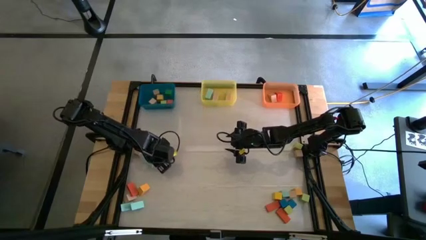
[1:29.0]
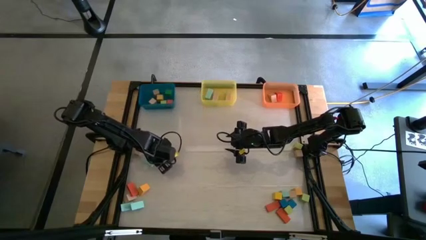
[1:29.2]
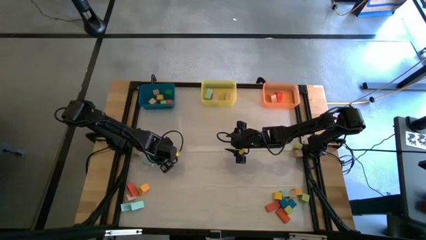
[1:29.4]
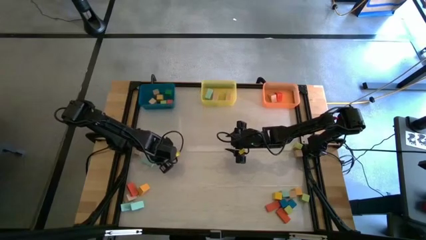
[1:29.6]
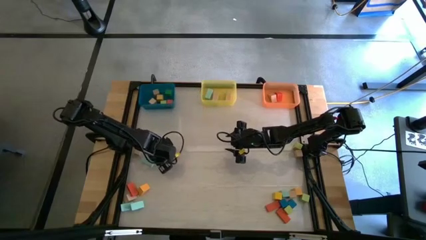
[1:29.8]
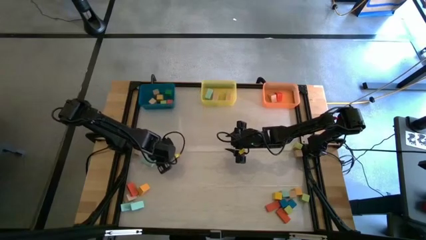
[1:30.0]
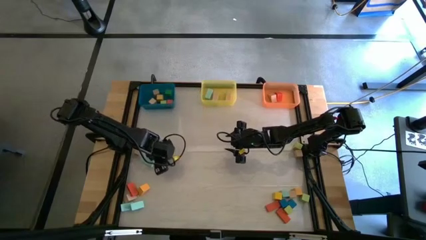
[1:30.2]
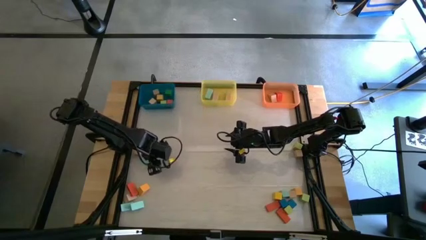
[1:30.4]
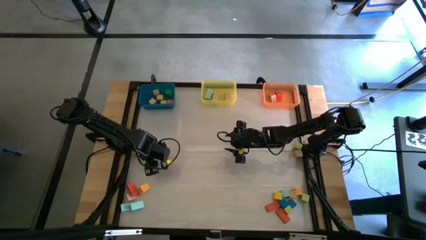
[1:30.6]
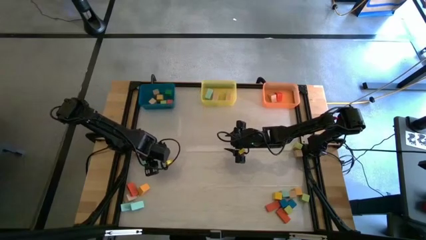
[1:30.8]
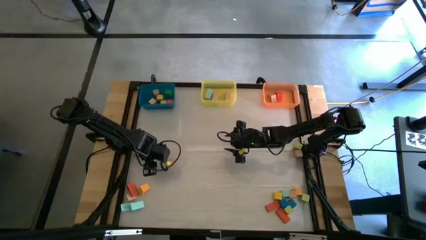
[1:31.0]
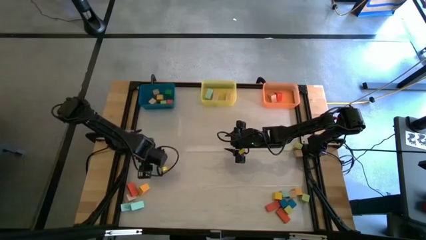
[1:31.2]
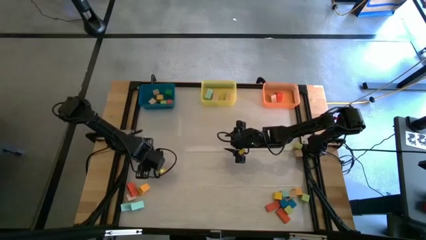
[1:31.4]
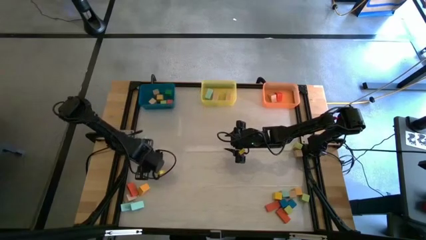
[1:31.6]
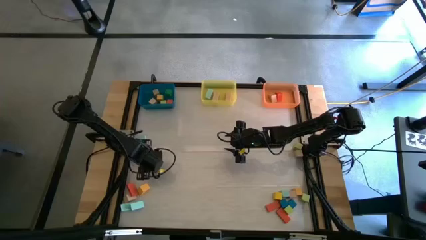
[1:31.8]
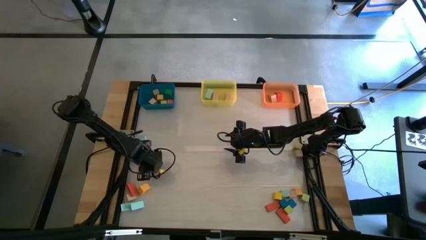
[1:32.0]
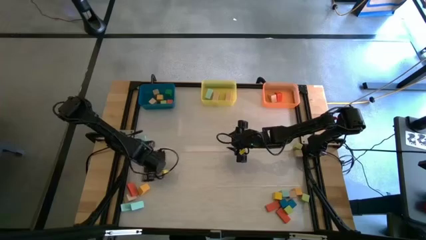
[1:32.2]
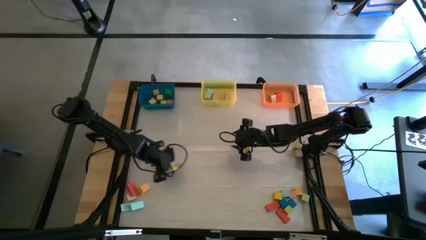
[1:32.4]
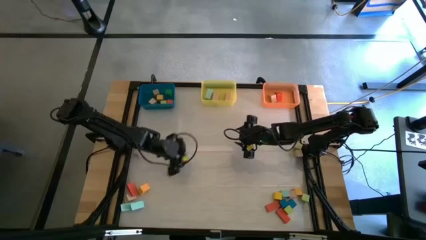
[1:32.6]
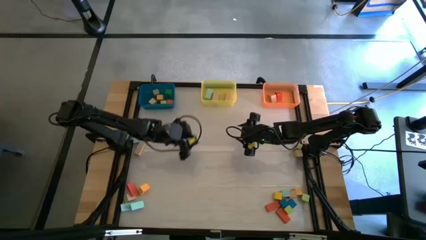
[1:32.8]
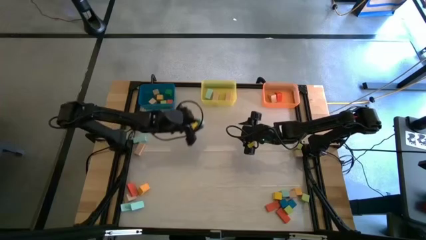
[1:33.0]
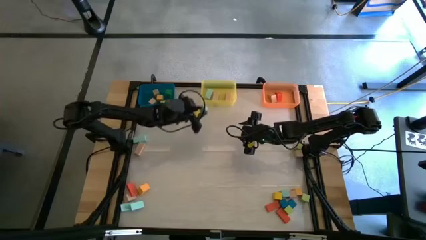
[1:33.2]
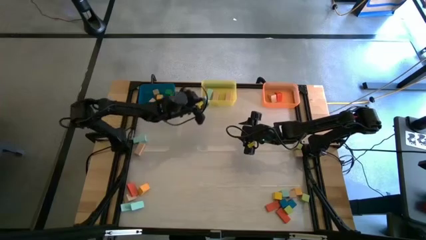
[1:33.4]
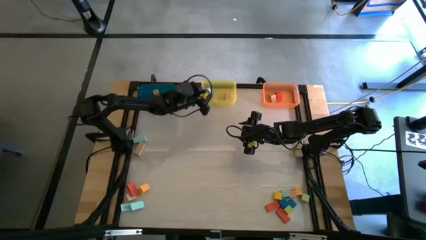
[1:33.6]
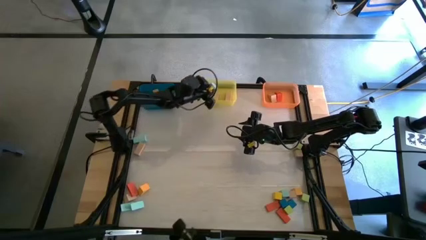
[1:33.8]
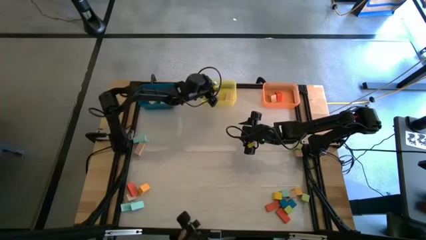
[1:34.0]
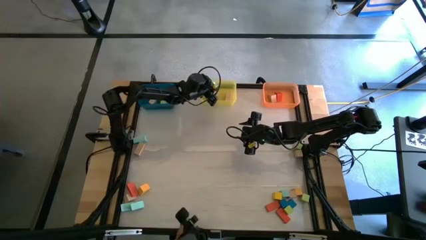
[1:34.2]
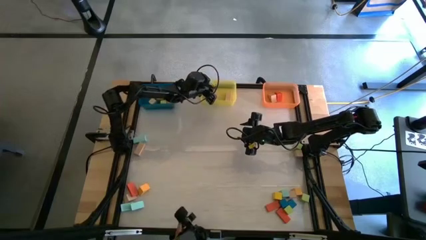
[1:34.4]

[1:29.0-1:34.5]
Task: Sort blocks by size
Put the light blue rectangle block into the yellow bin

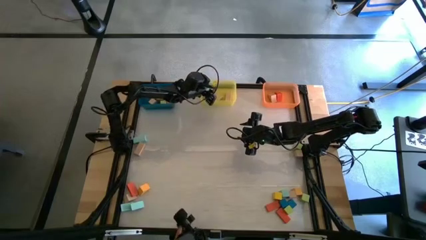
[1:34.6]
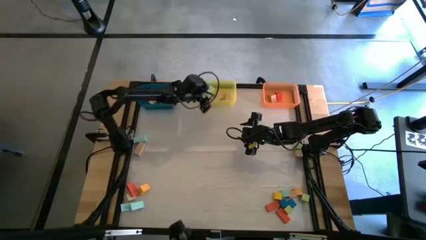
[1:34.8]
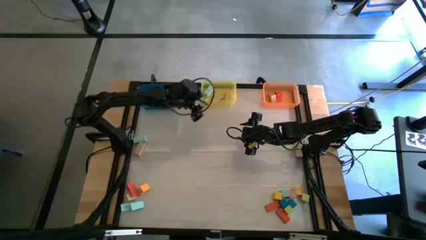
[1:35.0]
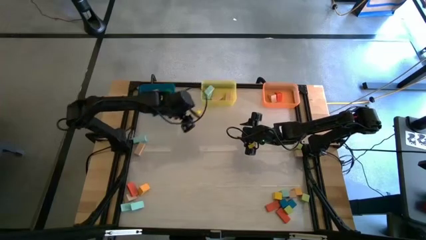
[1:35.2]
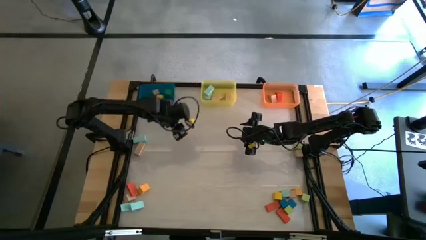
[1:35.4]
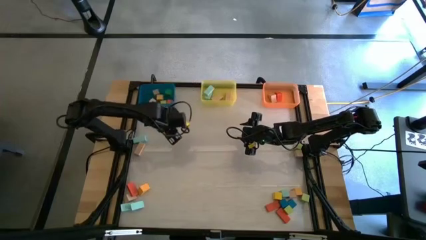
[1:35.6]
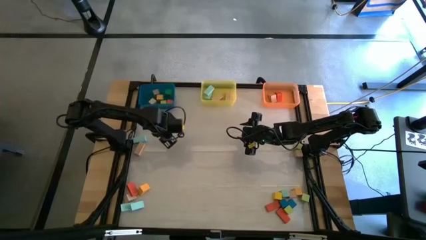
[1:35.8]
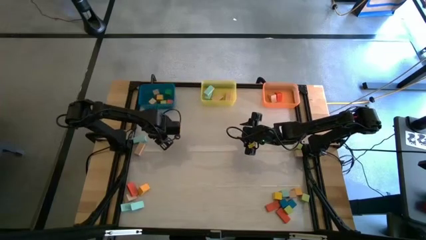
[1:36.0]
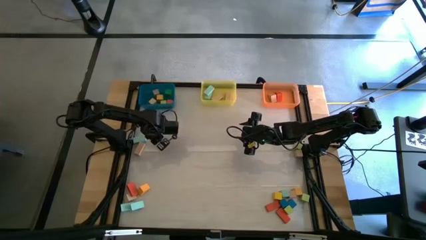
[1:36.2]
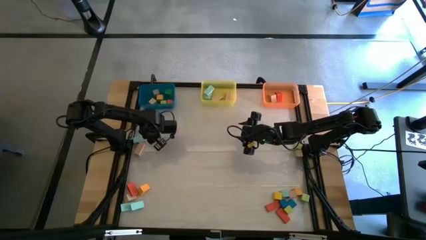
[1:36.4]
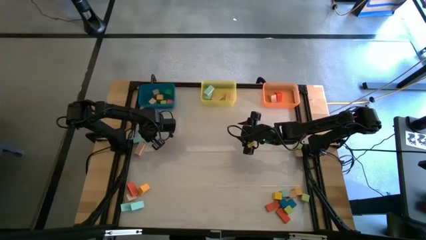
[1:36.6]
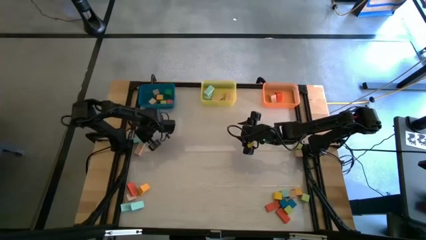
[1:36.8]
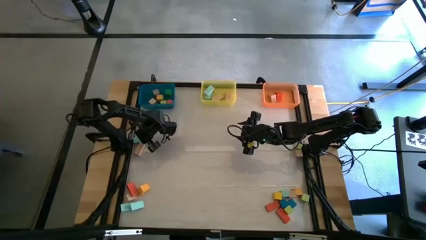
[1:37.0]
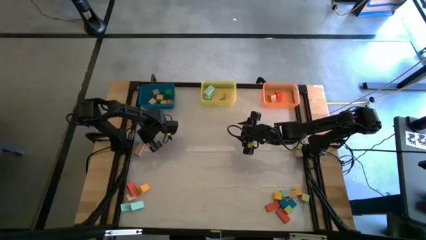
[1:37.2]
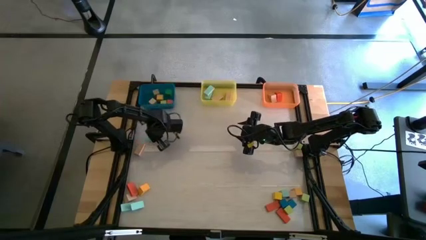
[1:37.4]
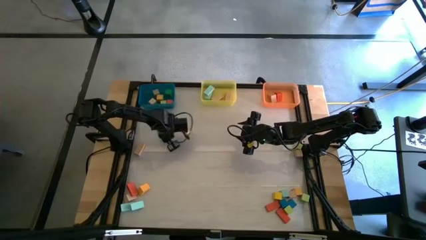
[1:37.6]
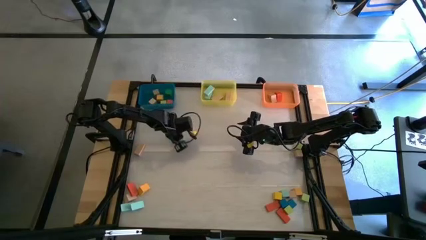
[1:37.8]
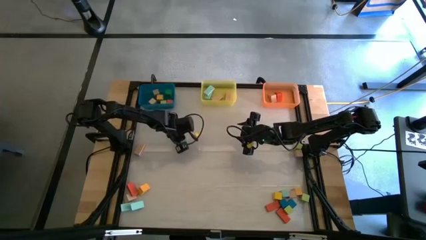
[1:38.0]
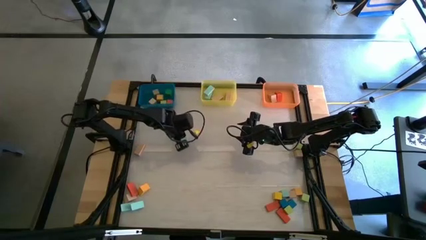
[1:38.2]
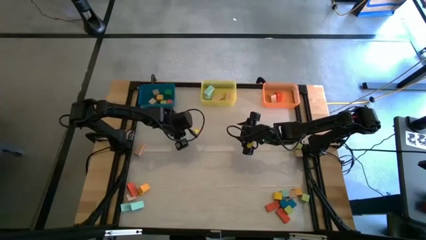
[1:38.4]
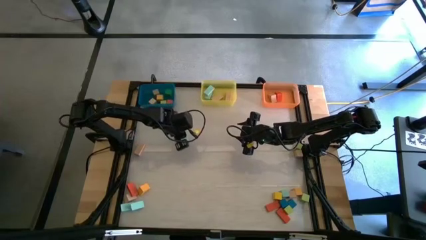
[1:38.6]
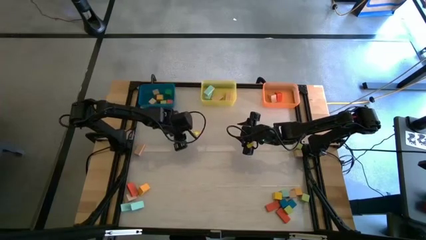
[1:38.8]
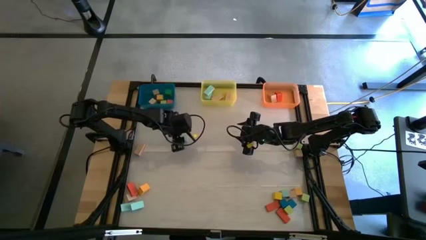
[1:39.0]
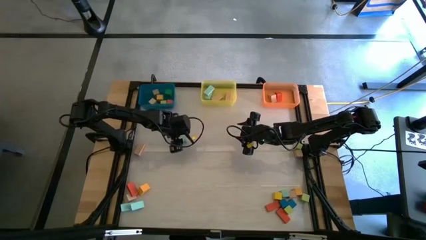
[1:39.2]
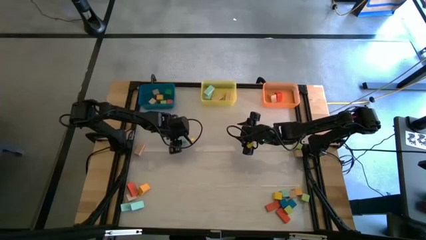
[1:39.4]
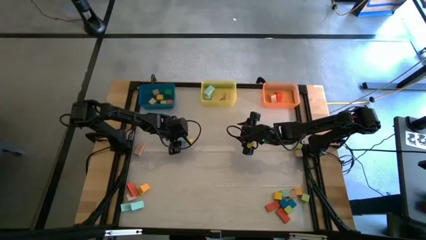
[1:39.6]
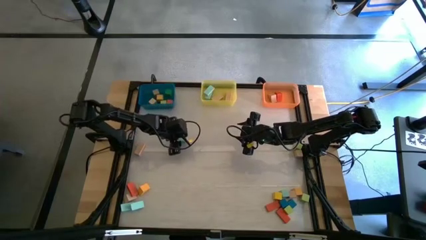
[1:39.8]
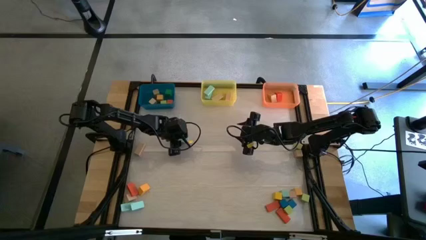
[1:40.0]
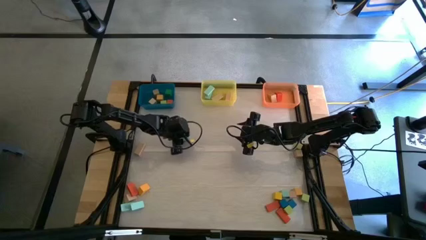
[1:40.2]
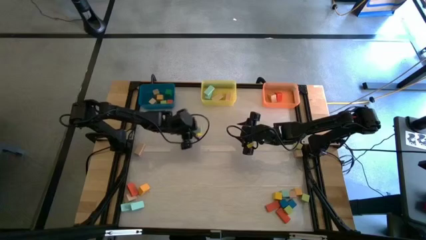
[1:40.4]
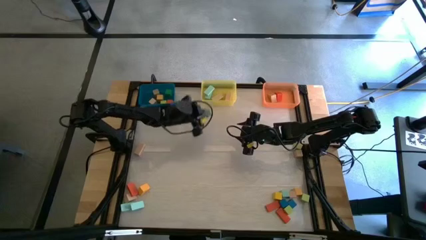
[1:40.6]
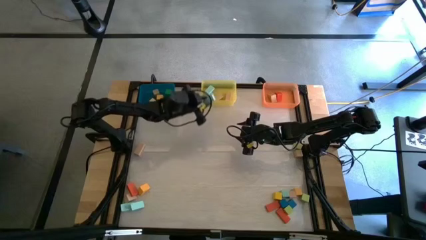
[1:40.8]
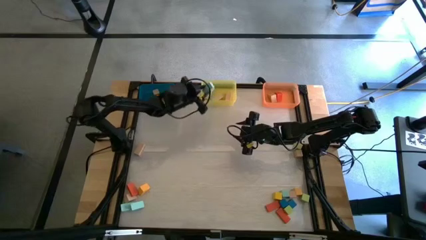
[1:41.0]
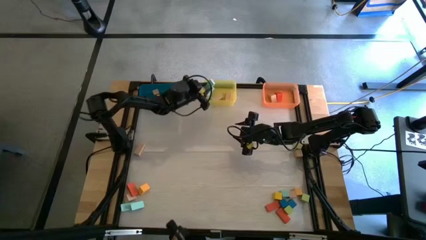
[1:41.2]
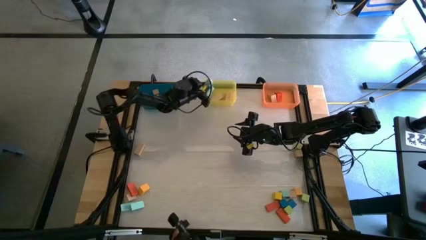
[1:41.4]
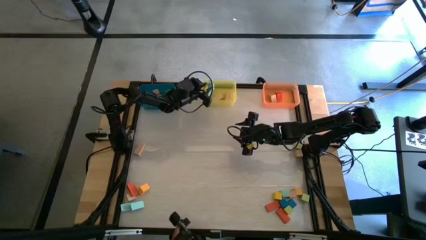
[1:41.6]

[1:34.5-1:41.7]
Put the light blue rectangle block into the yellow bin

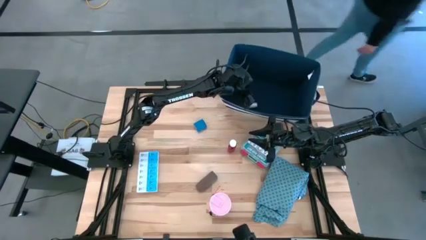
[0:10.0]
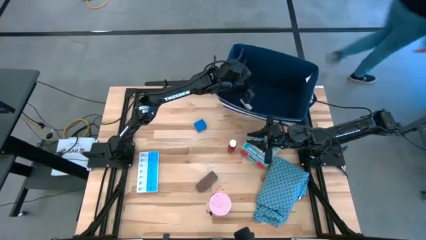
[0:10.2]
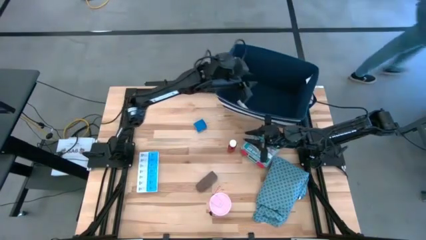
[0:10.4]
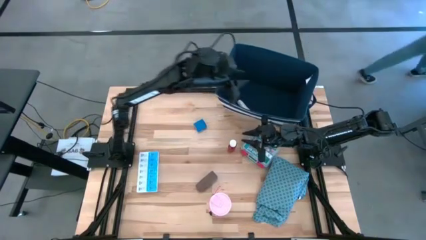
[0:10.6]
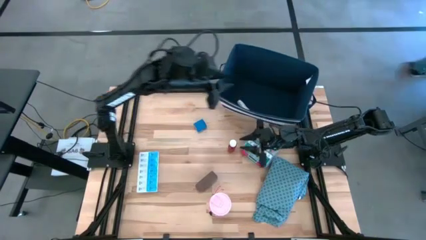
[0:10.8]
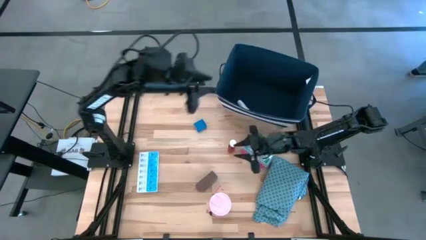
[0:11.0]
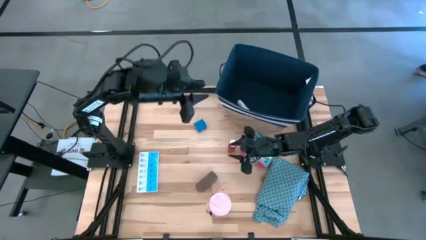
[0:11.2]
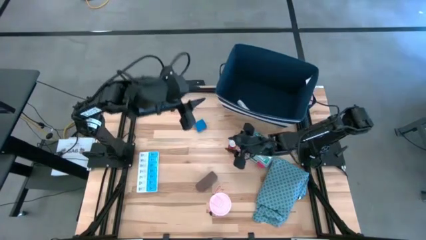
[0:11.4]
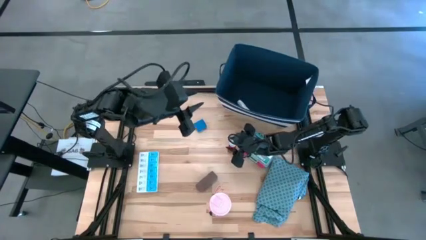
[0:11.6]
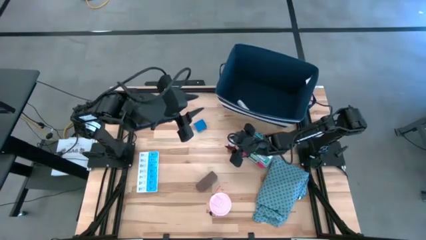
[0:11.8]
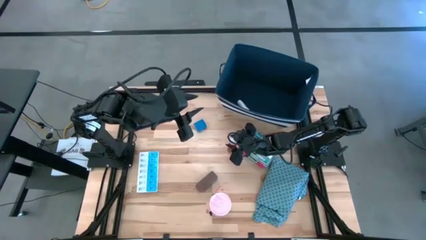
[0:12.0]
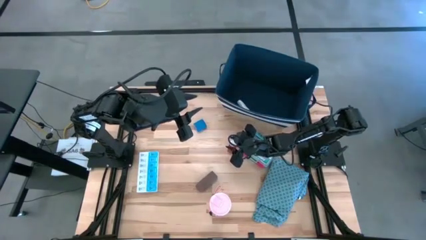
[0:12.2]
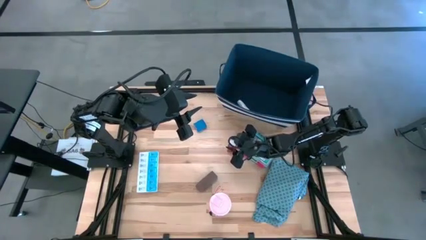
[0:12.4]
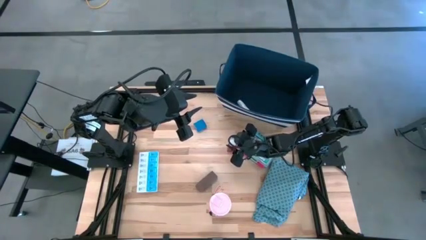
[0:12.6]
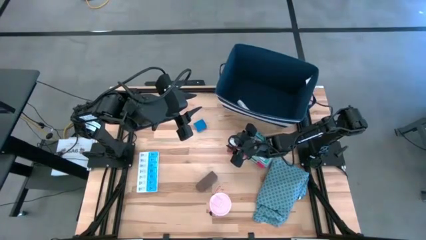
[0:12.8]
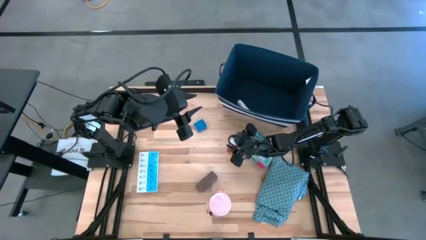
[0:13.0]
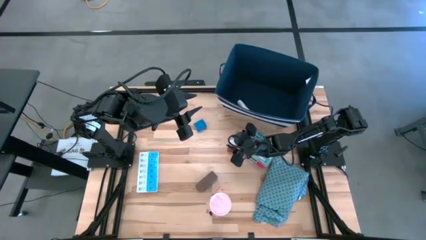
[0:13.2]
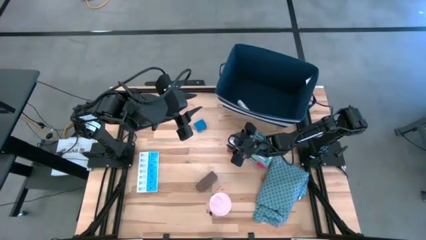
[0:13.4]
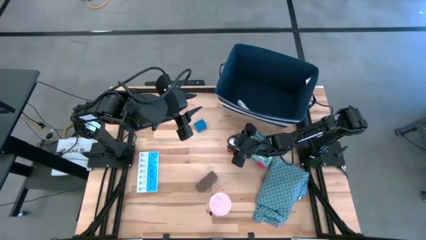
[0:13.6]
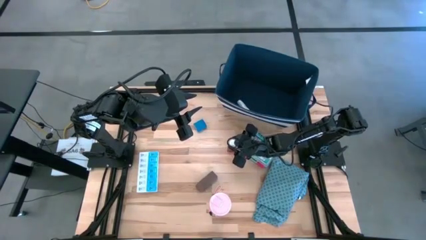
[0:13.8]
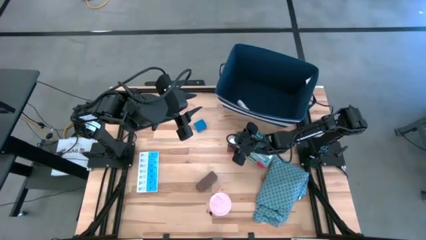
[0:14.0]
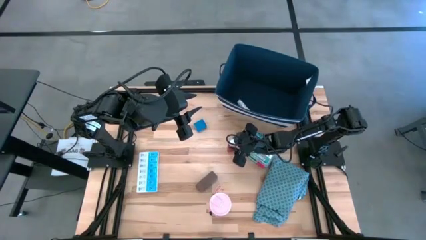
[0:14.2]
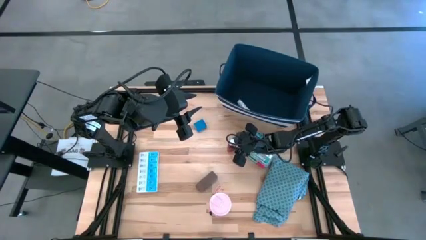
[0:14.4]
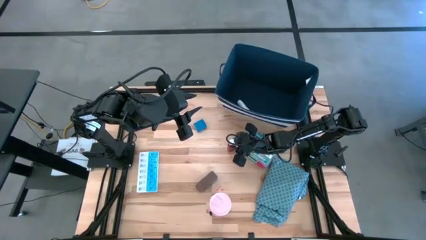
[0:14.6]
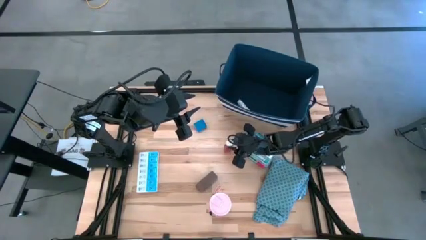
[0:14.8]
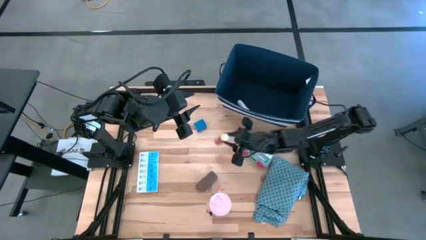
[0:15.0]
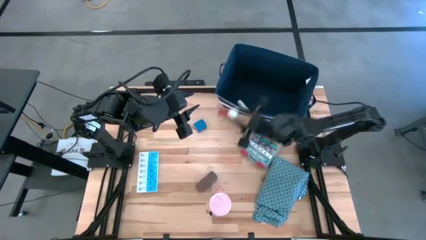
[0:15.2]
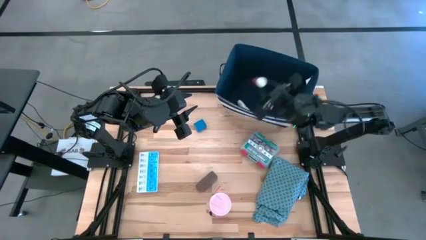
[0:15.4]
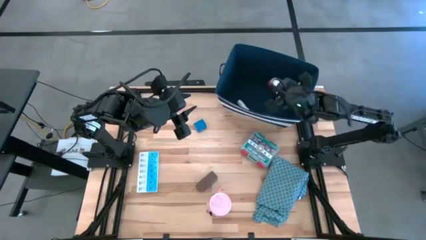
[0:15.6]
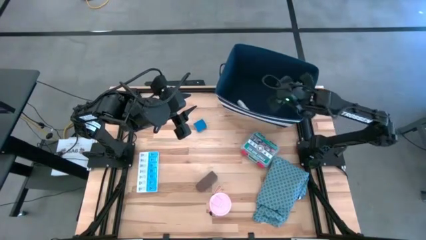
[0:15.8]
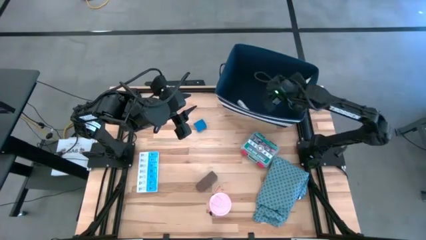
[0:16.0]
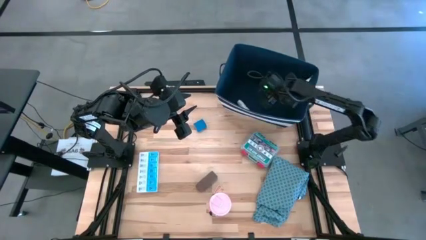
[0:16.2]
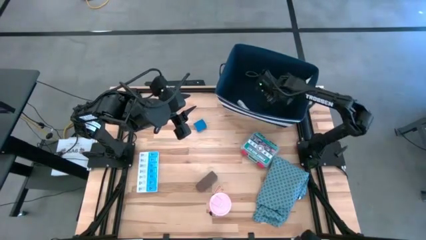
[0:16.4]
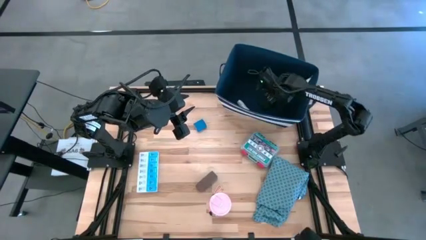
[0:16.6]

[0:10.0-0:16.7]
Task: Pick & place medical supplies in basket/bin
Put the red pill bottle into the white bin
